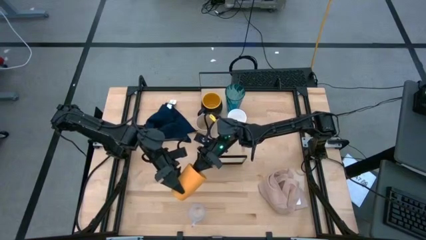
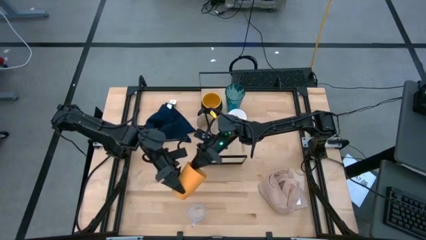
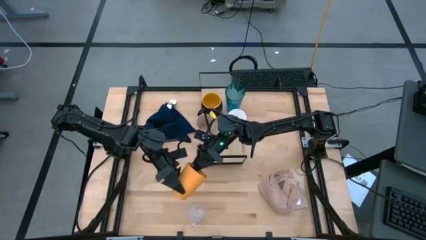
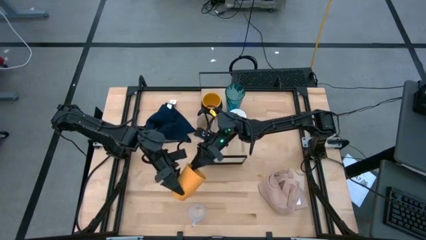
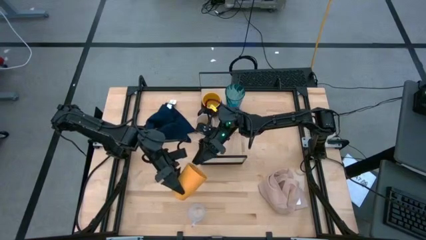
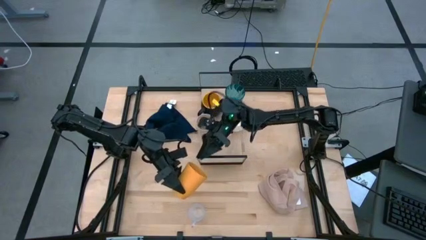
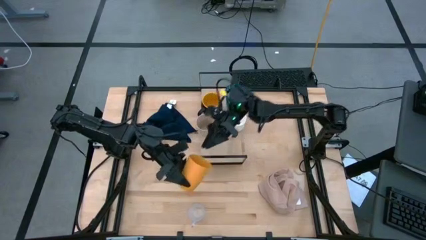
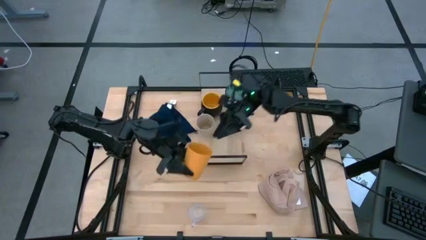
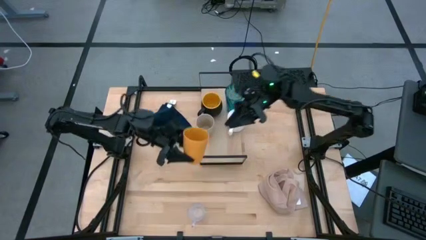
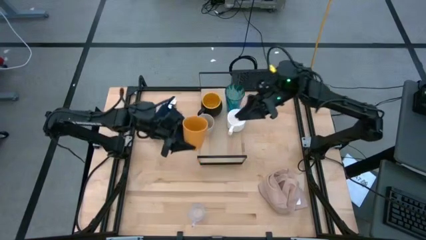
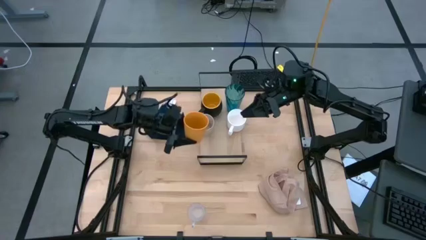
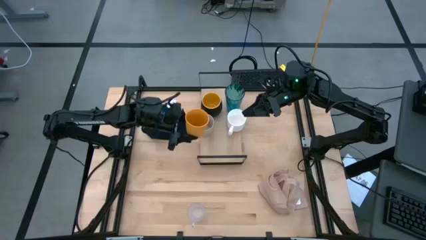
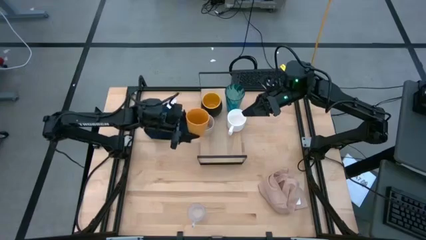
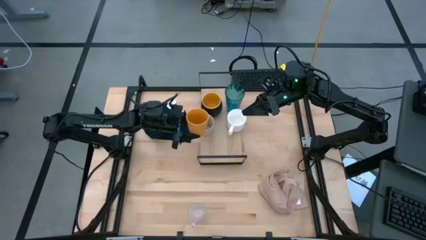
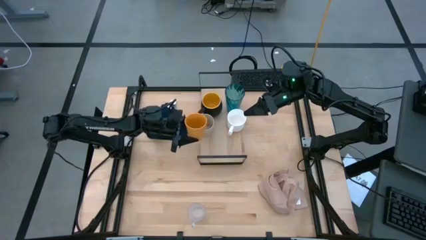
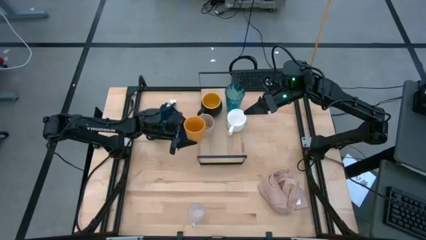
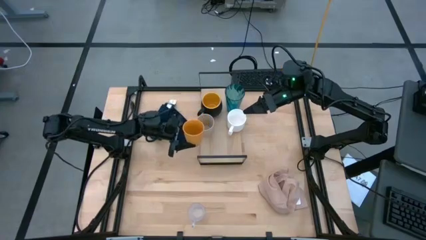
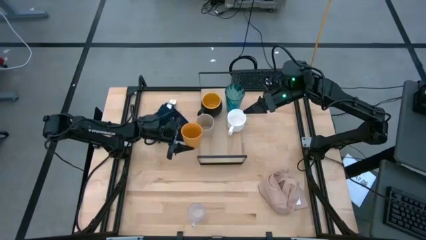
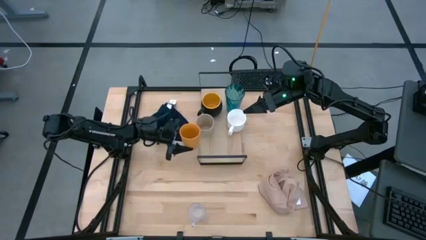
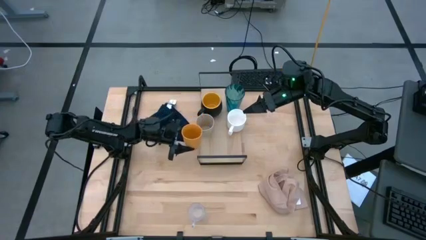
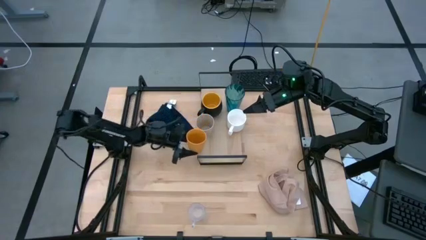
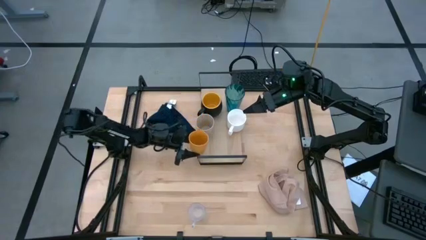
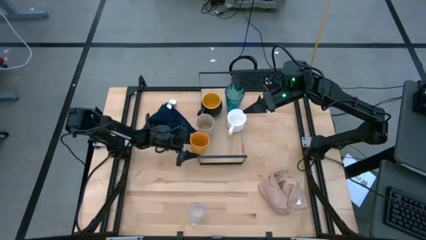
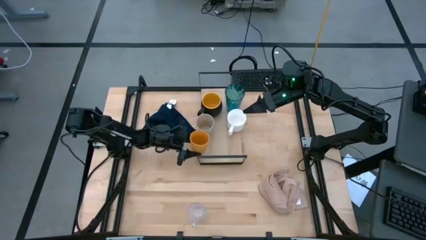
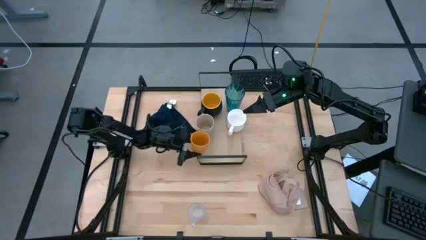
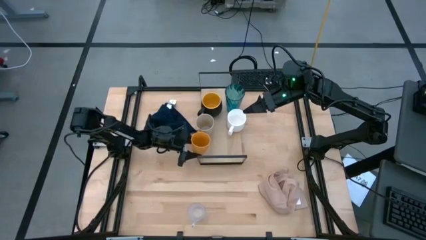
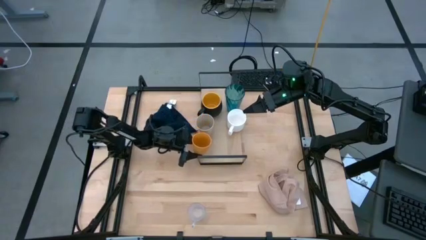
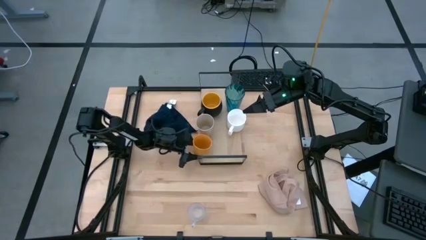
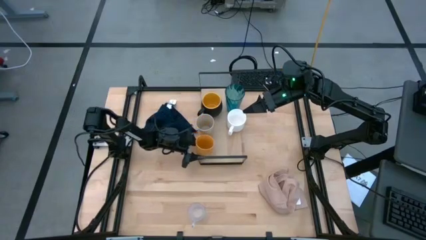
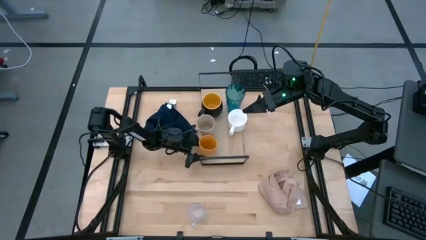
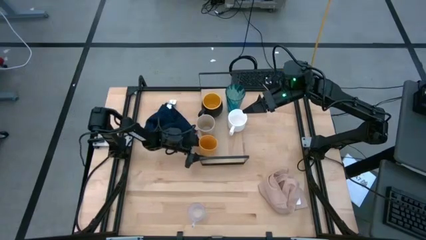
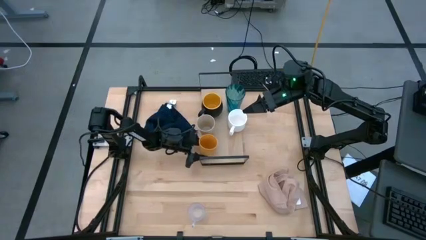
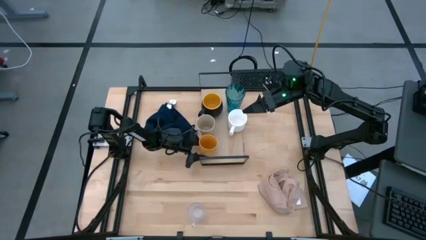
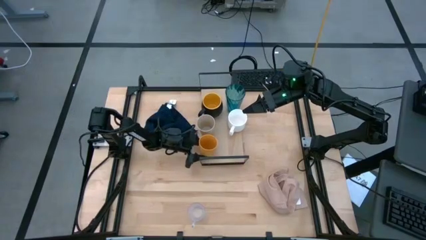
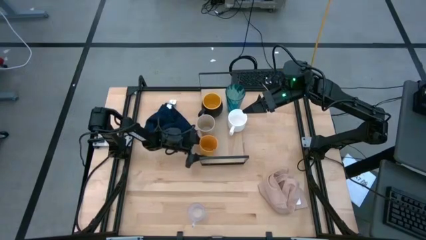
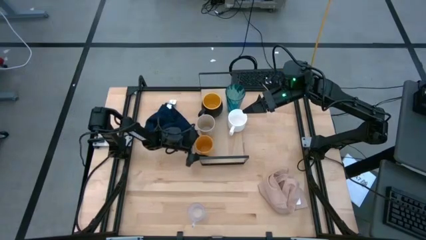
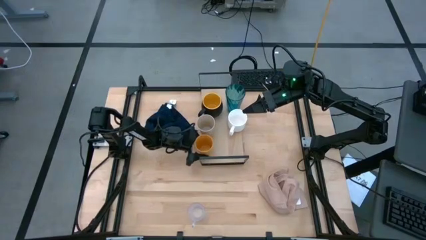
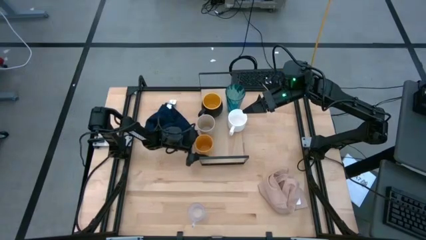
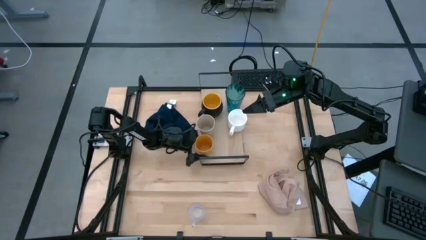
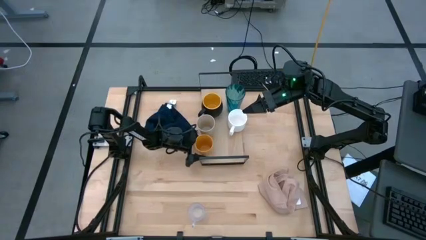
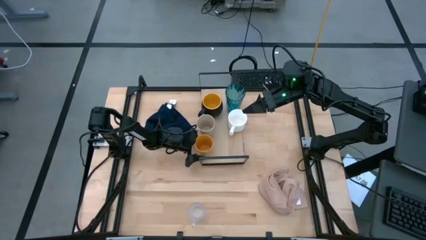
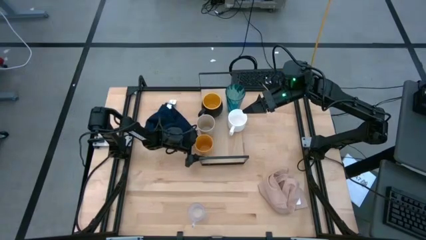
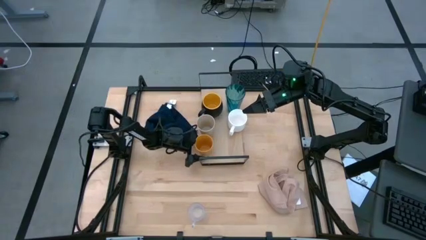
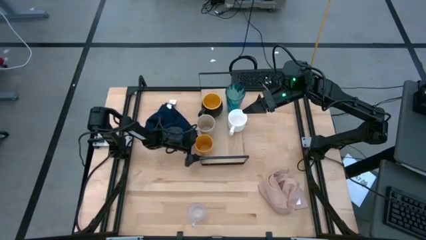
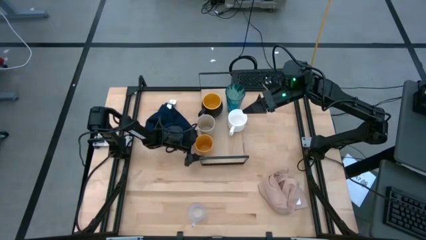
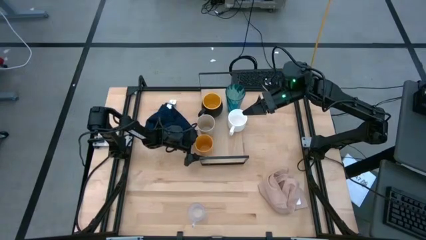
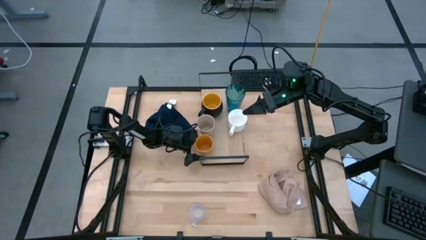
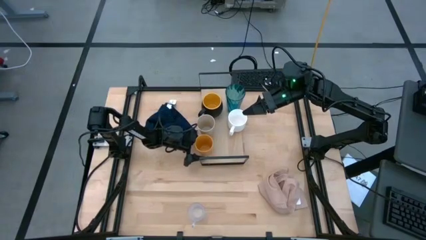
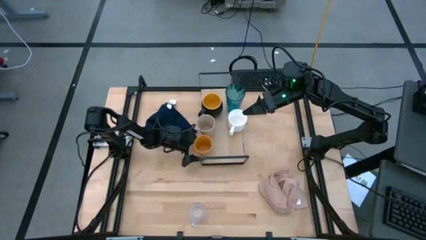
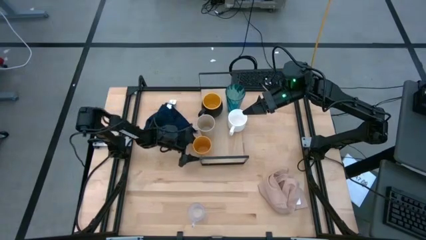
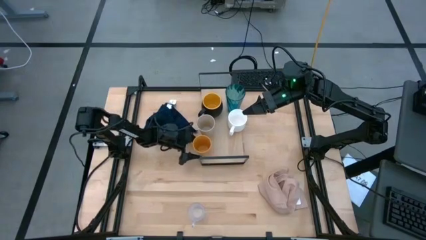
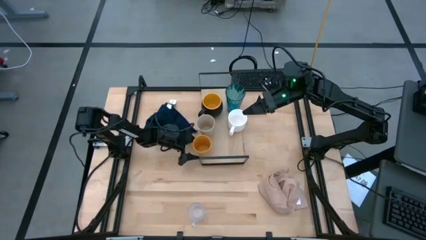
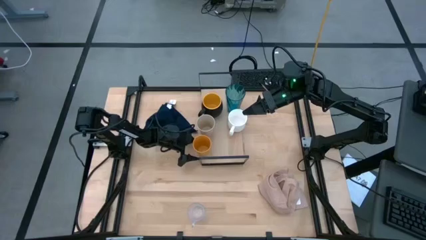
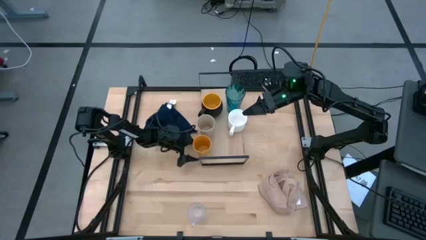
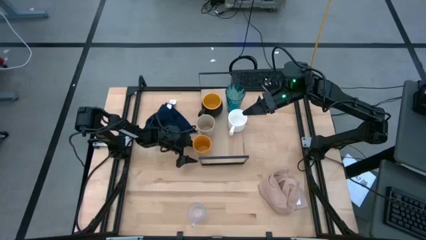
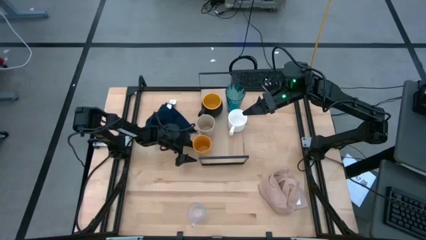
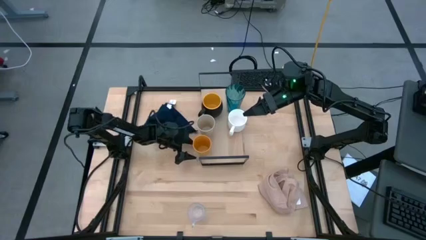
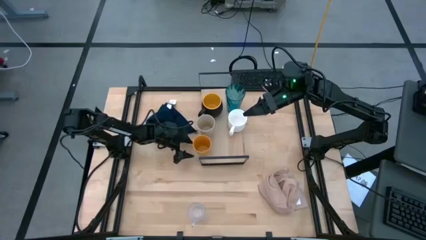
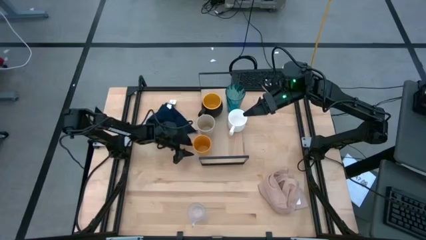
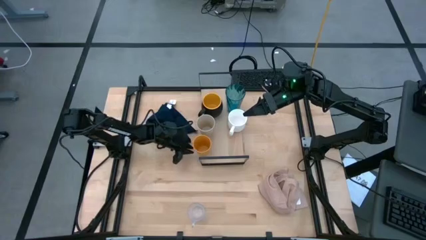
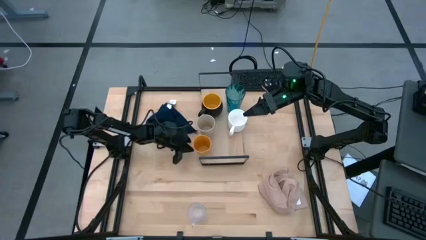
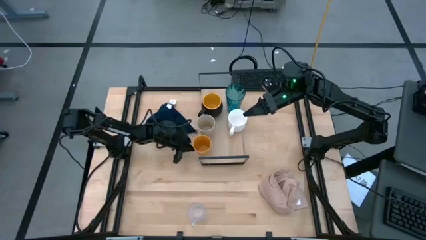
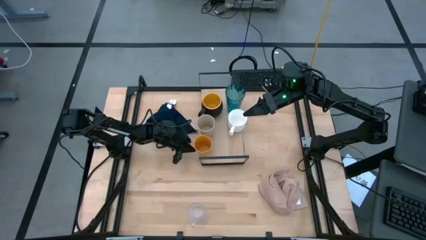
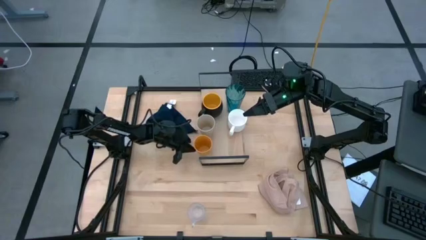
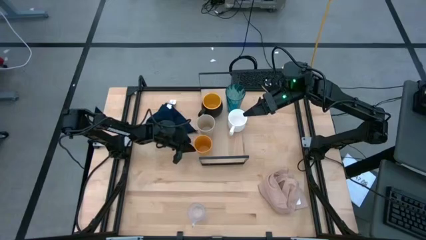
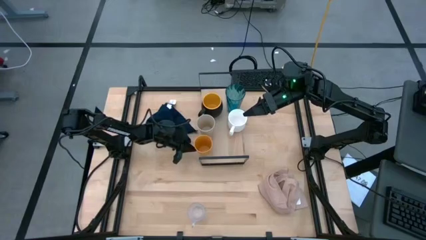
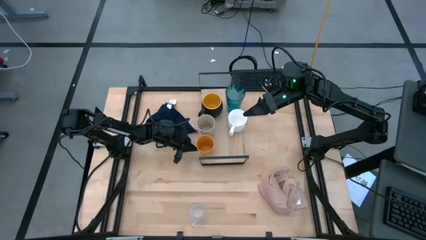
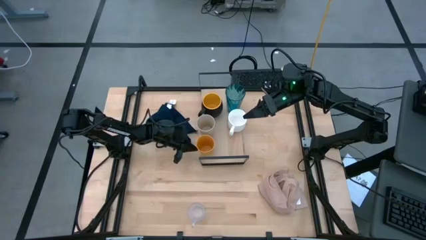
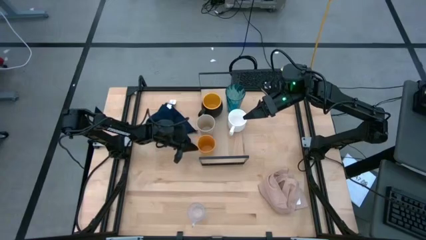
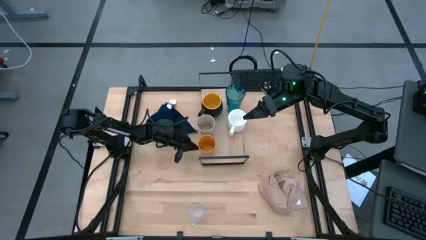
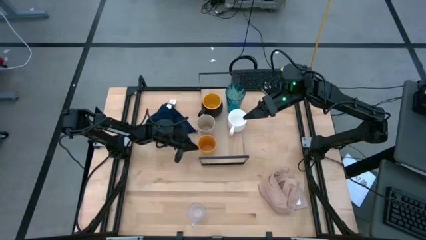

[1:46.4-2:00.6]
Task: Stack small to large cups/mugs on shelf
Put the yellow cup on the shelf

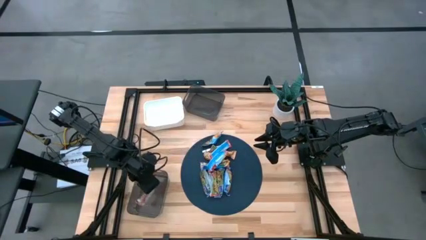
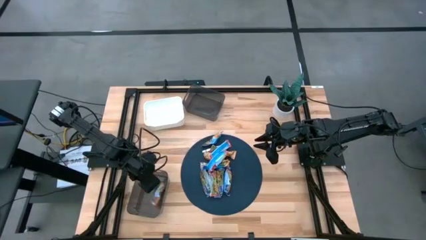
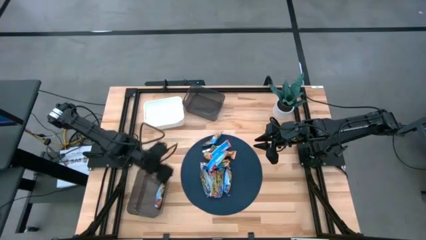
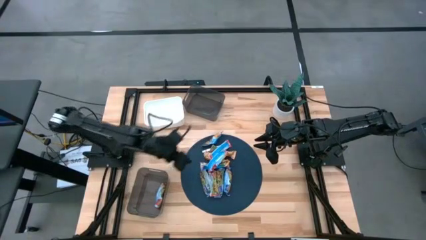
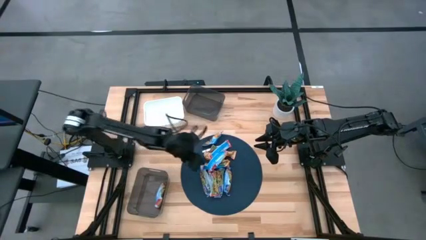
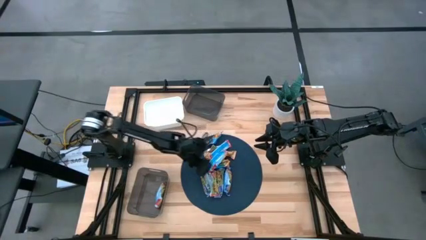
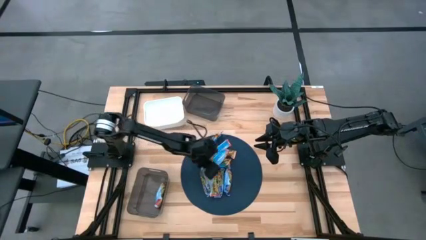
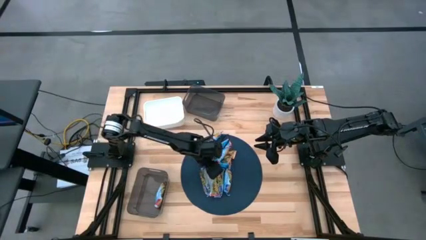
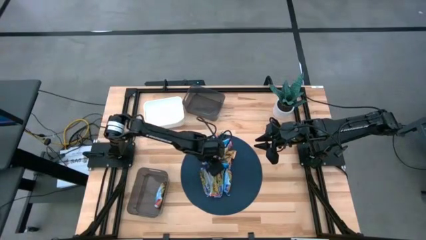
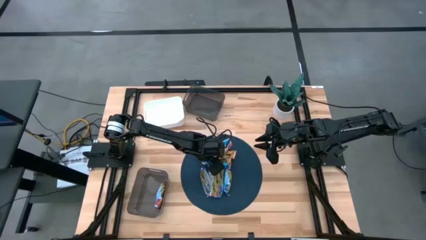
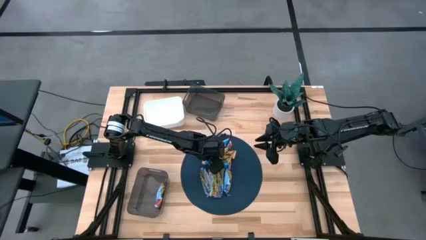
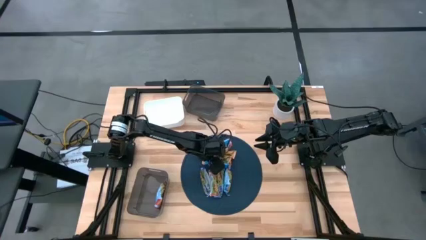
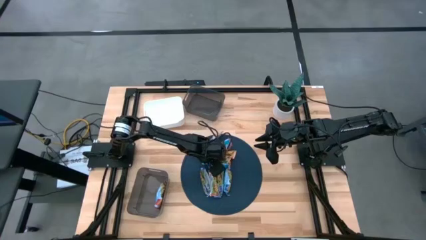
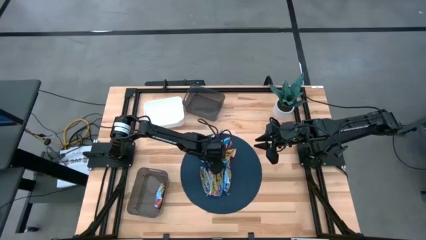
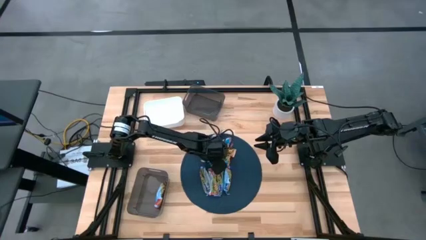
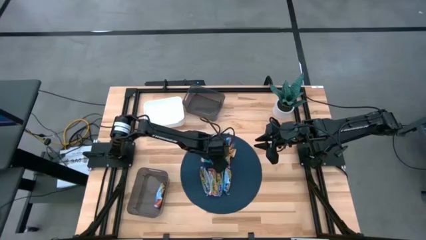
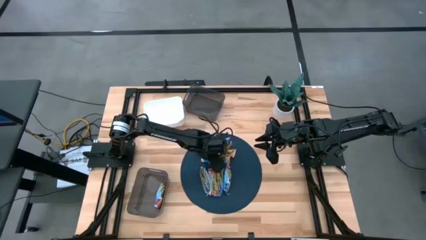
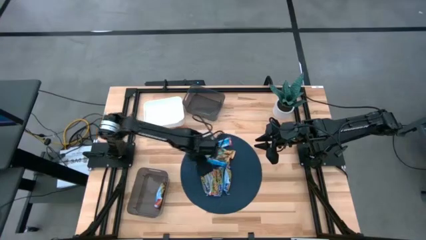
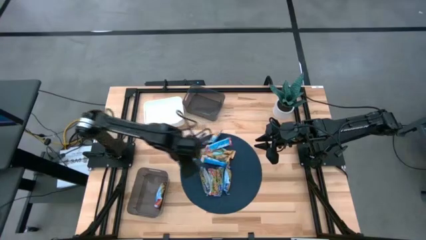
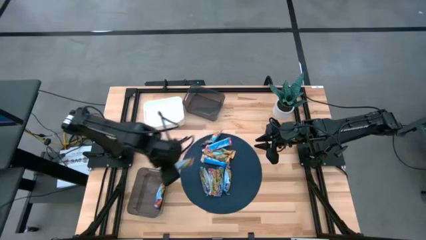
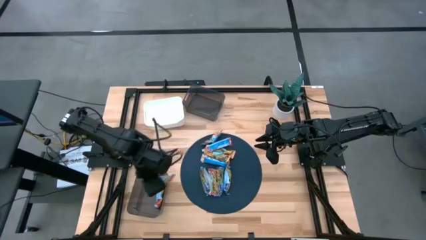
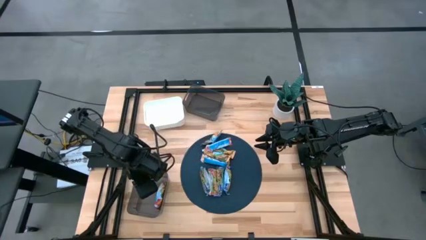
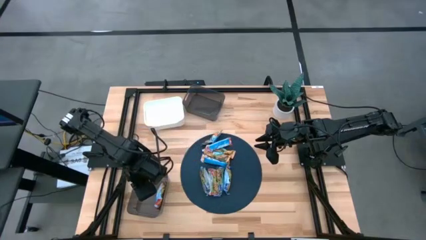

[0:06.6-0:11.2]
Task: Pick and place Granola Bars by type
Put the red granola bar into the bottom black bin
